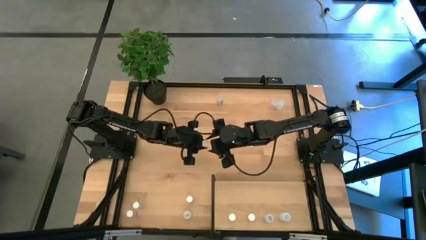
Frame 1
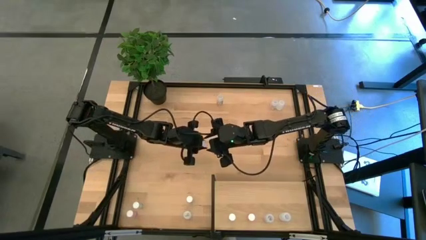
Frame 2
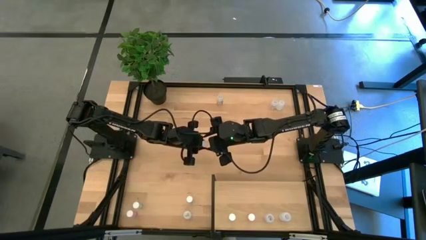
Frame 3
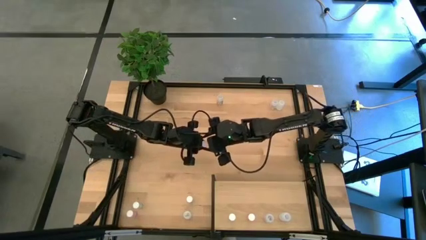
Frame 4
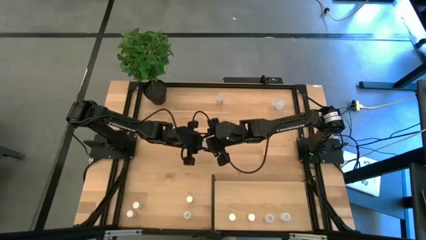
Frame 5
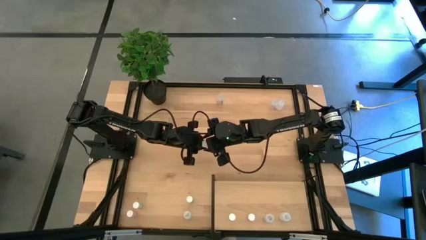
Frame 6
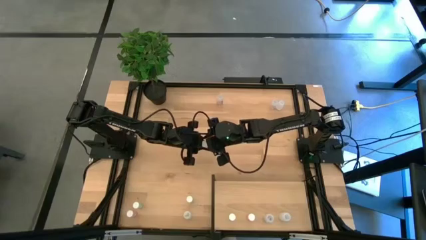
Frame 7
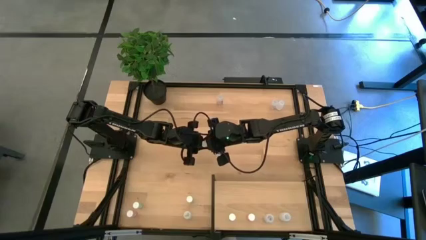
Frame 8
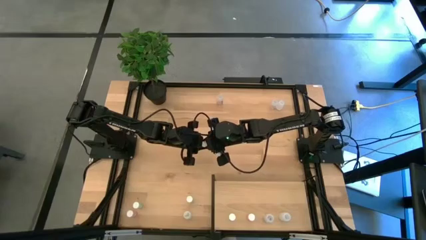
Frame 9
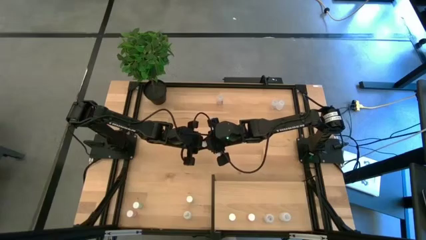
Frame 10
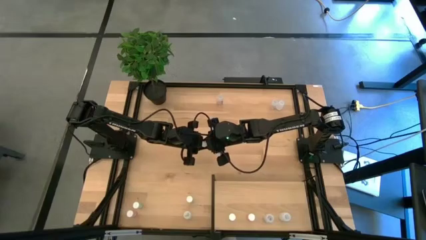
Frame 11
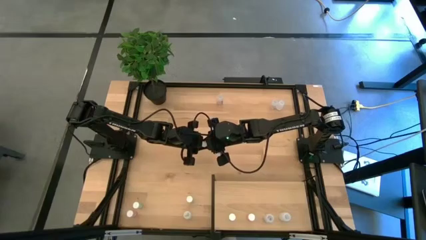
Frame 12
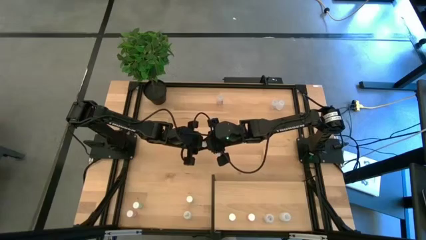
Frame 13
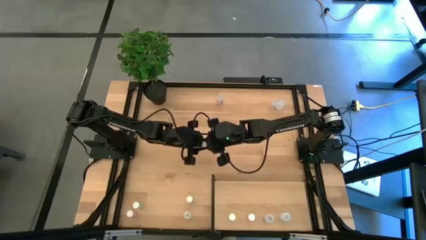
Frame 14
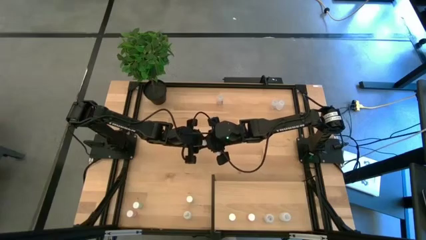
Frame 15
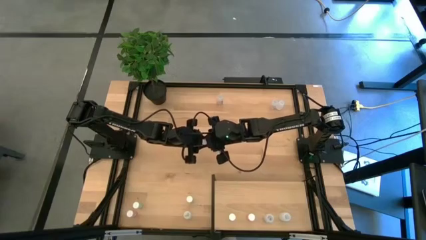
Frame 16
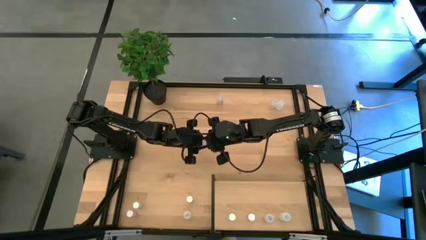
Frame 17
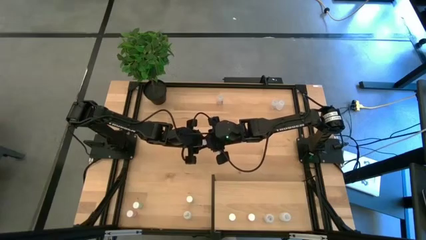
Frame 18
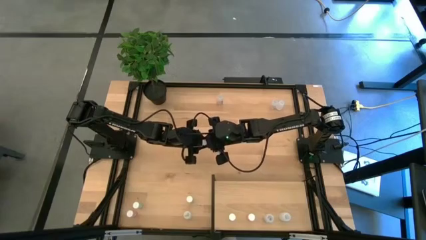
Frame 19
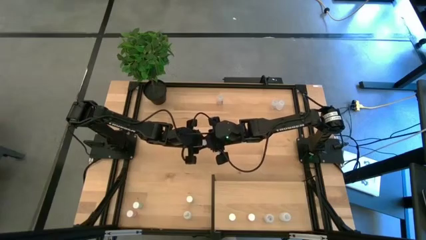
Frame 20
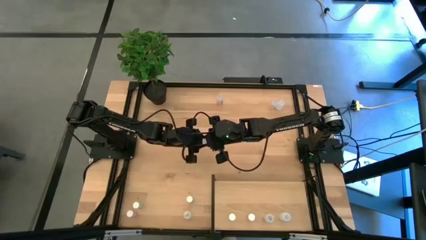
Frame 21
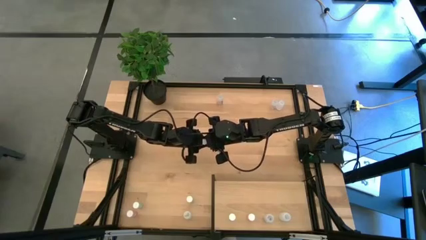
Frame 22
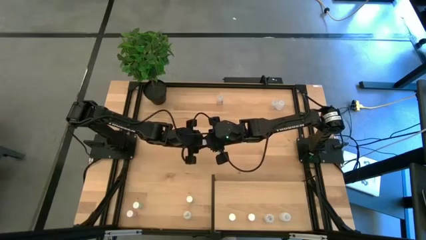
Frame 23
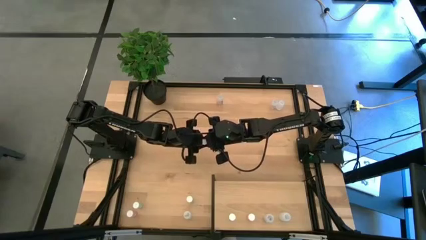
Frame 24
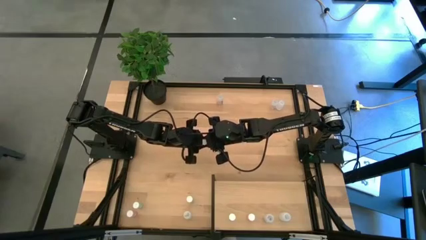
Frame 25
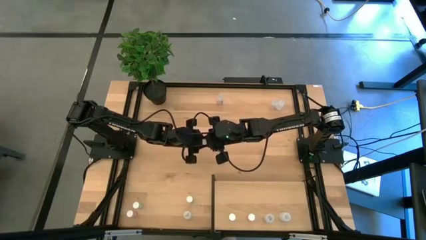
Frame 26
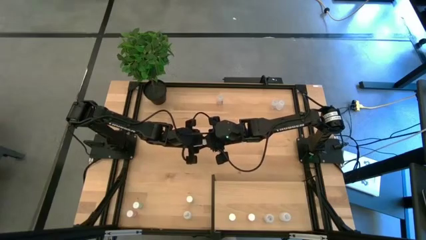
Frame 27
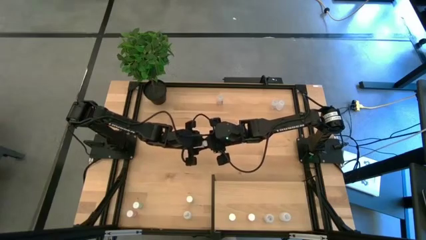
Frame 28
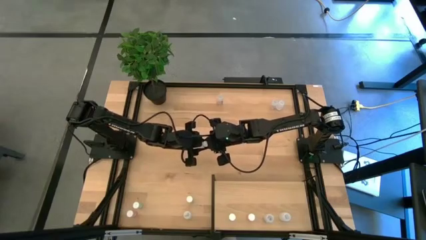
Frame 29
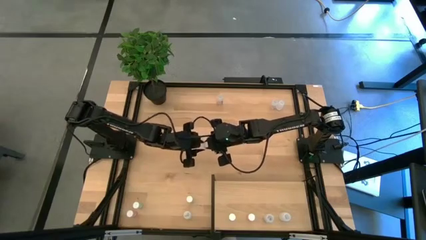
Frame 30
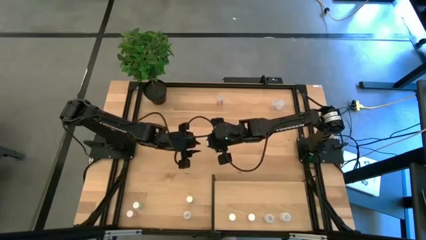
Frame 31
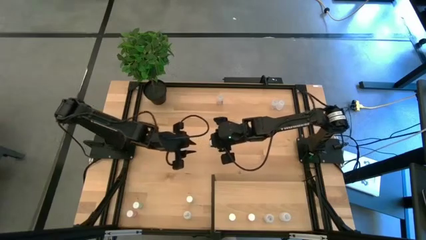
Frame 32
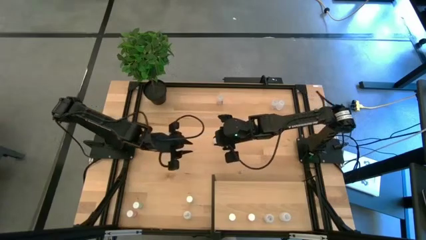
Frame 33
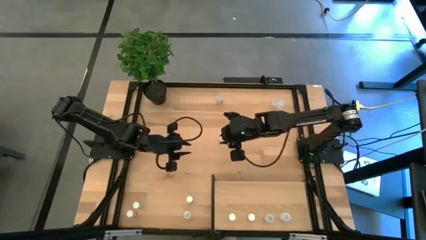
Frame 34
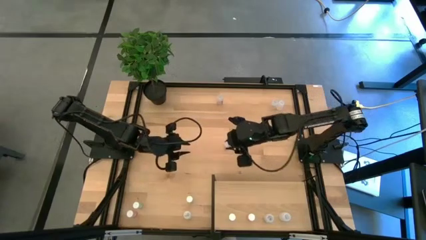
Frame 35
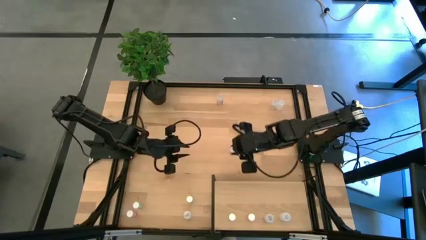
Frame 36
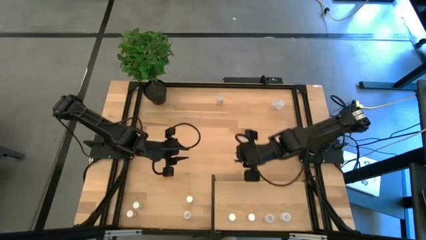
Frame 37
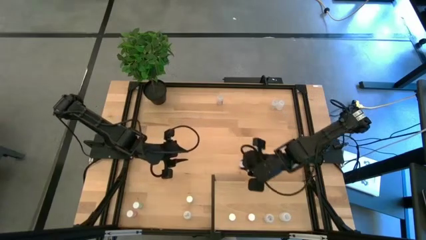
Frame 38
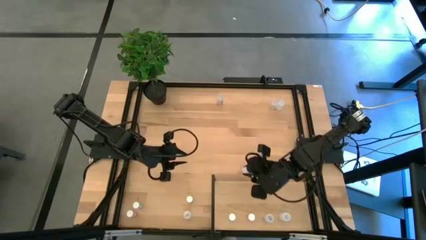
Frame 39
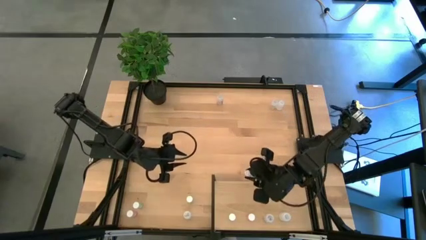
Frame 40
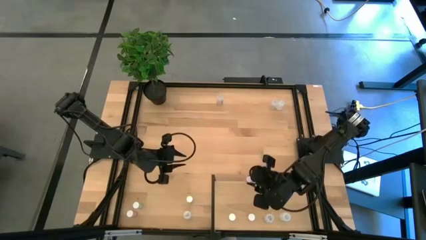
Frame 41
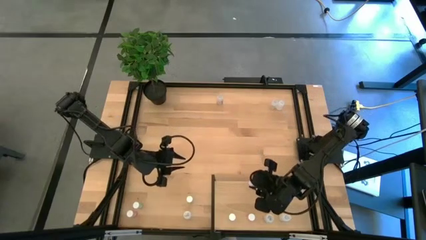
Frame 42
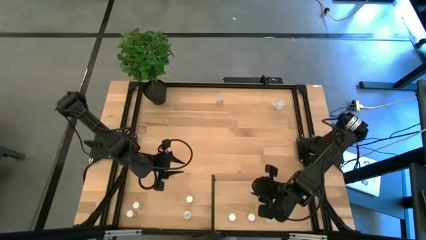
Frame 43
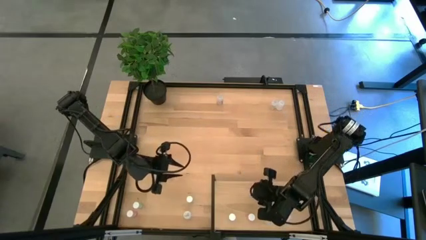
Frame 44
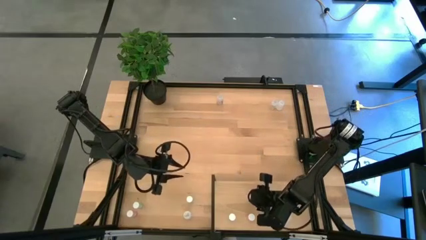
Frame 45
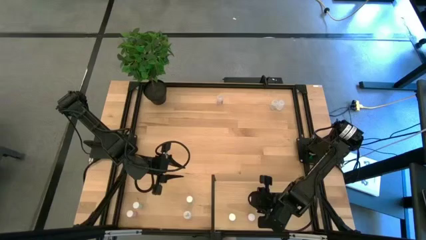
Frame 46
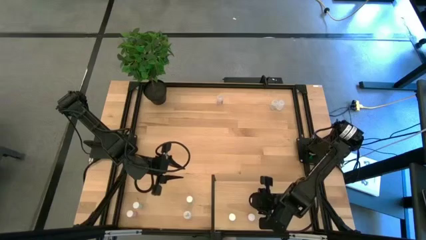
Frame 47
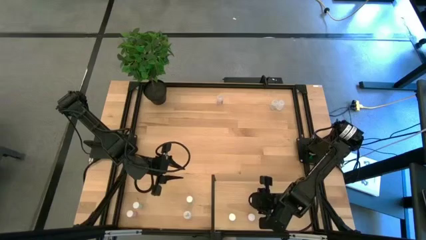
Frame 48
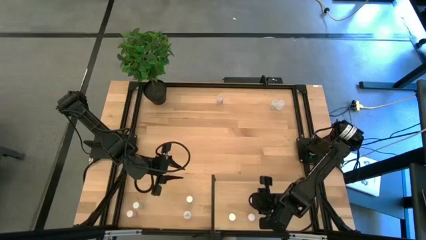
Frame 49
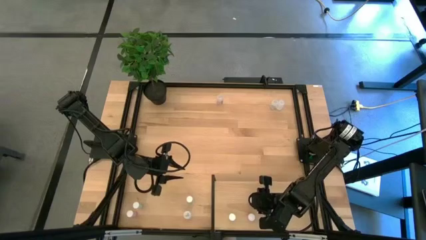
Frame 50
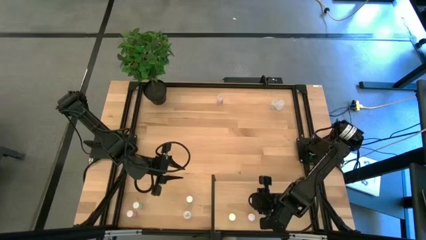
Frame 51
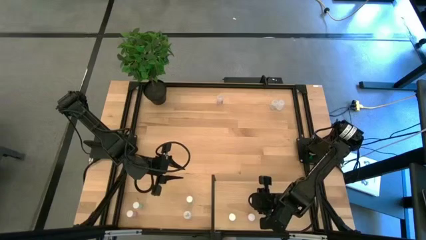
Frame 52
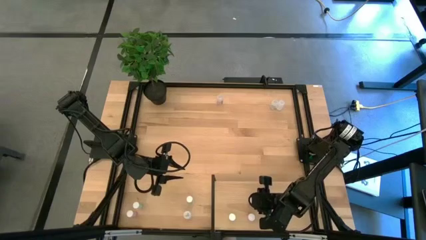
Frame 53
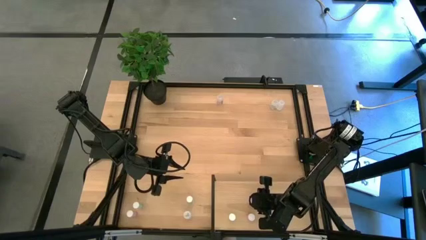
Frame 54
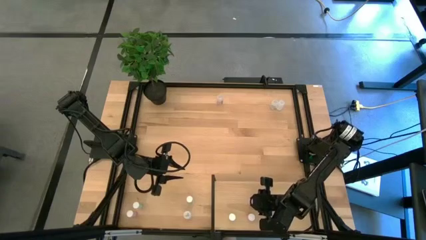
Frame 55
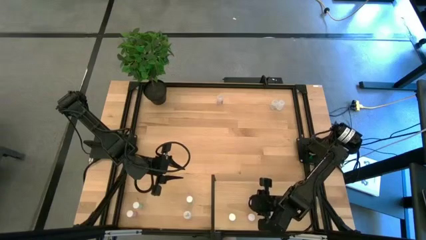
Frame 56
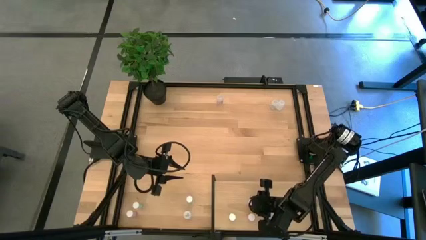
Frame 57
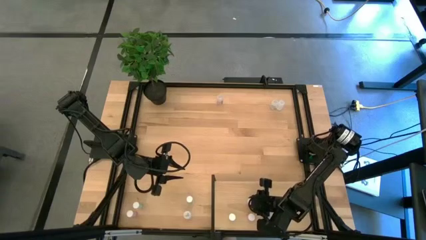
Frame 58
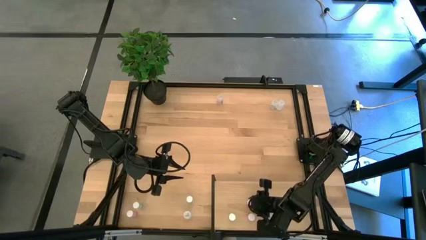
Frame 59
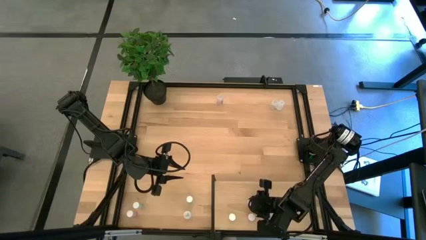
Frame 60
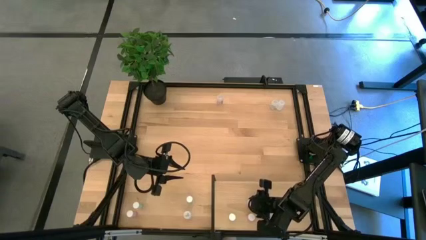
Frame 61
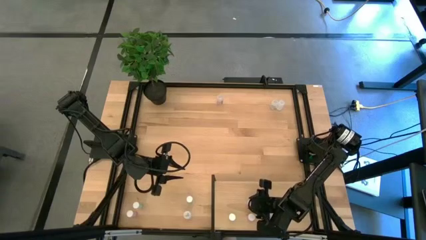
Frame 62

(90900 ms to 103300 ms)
Task: Pick and place medicine bottles onto shelf by color
Put the top pink pill bottle on the shelf aligned with the other pink pill bottle
